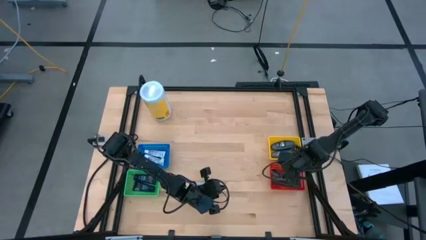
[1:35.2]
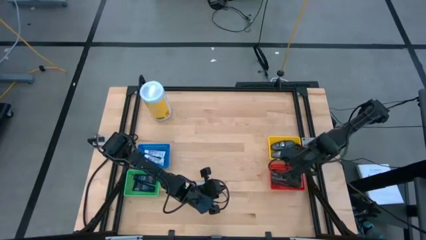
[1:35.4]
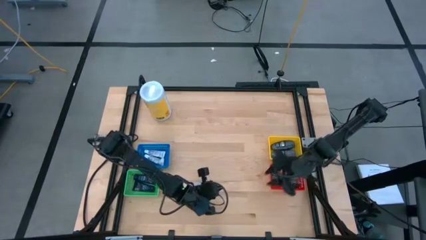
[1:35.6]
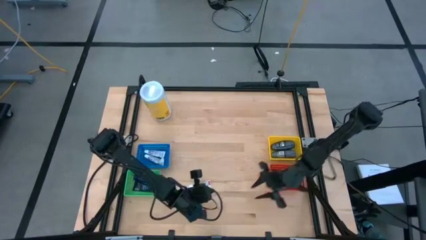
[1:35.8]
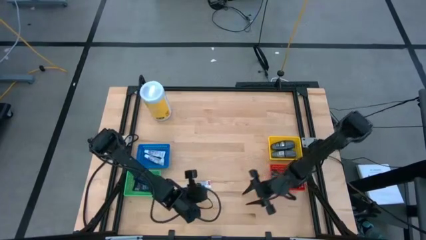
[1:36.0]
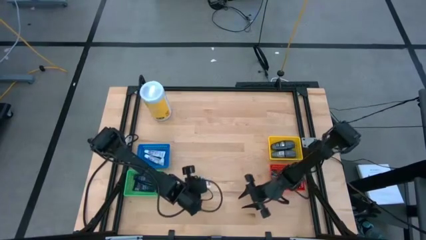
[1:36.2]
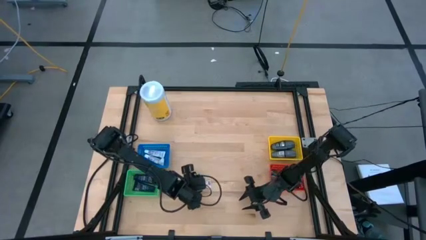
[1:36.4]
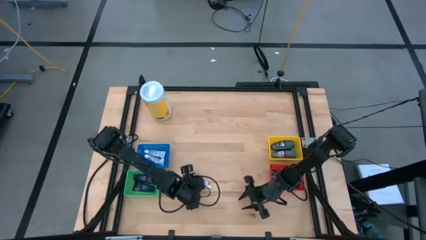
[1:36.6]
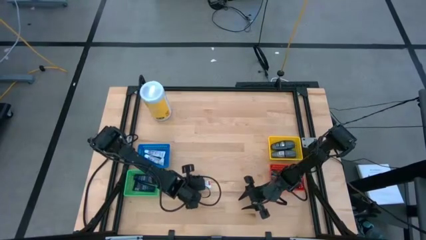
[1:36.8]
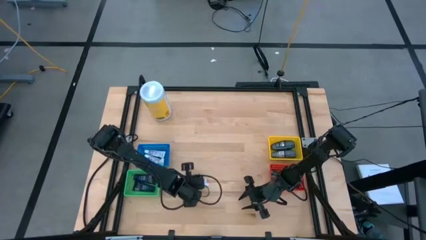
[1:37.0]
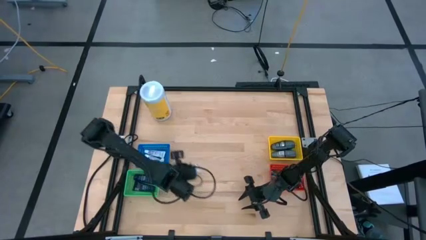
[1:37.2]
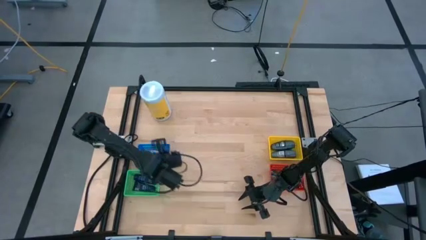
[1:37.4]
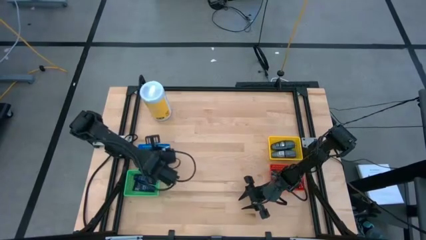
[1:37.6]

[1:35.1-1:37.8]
Task: Pick & Place Travel size toiletries
Put the white toothpaste into the blue basket

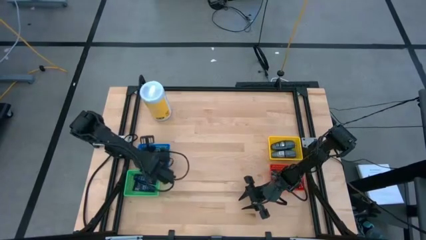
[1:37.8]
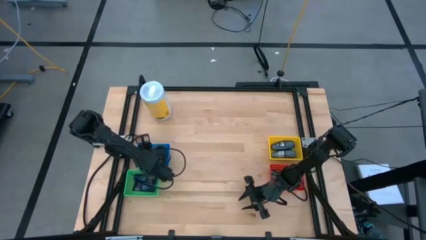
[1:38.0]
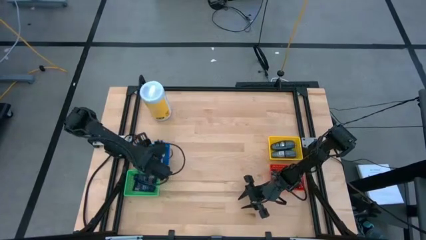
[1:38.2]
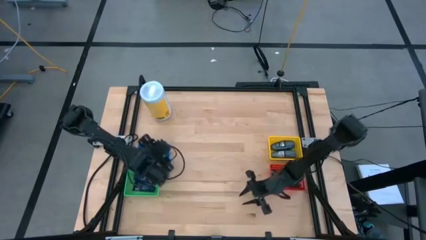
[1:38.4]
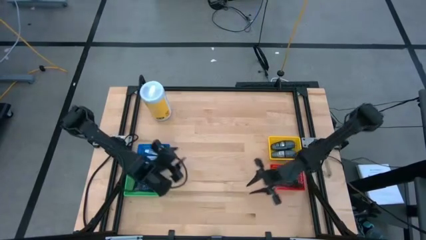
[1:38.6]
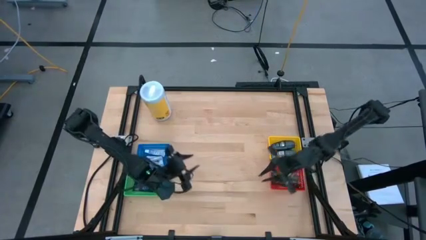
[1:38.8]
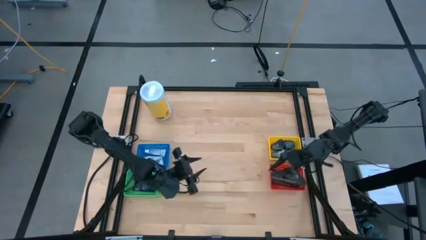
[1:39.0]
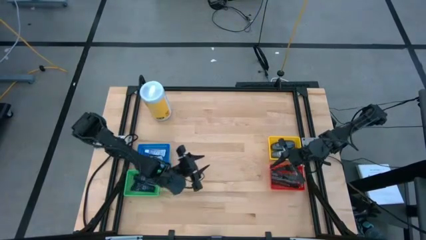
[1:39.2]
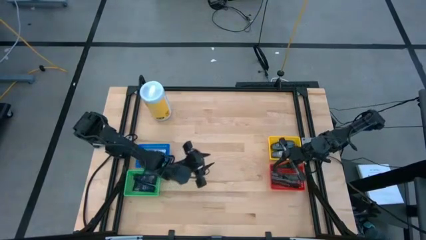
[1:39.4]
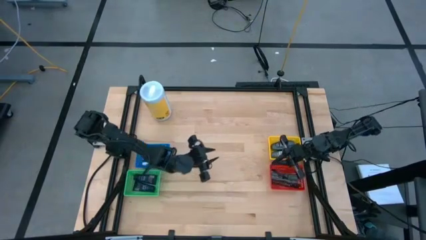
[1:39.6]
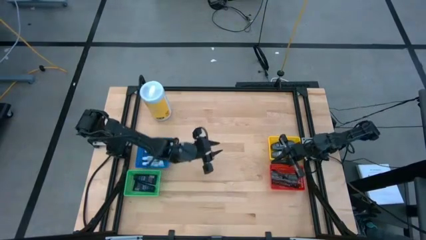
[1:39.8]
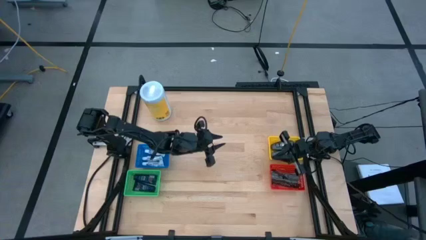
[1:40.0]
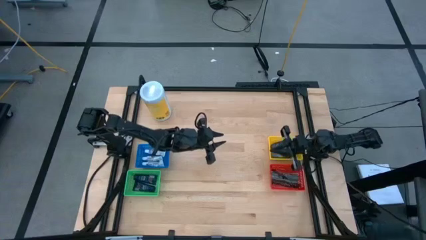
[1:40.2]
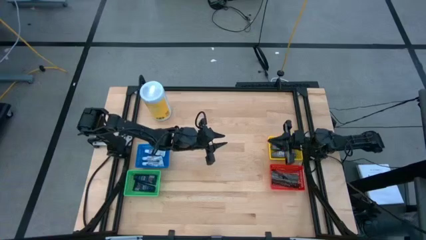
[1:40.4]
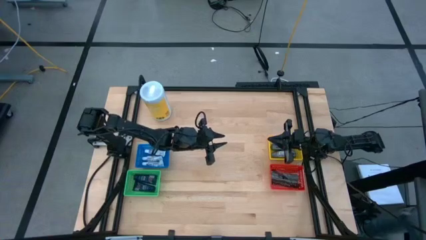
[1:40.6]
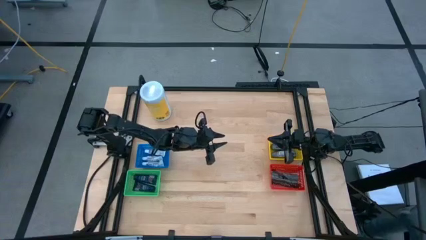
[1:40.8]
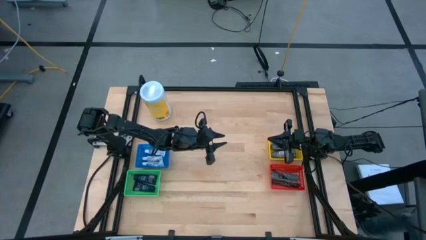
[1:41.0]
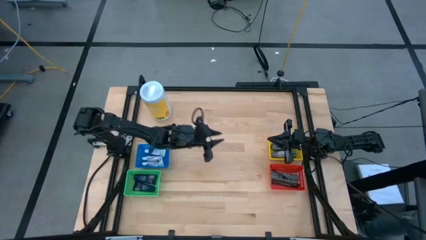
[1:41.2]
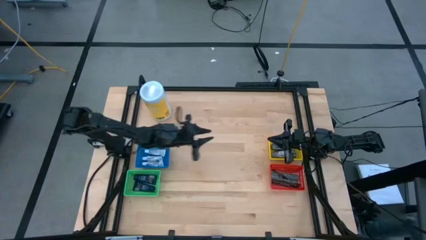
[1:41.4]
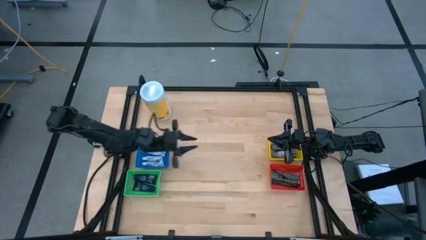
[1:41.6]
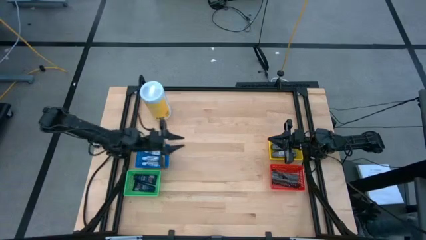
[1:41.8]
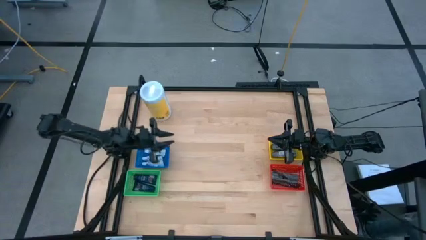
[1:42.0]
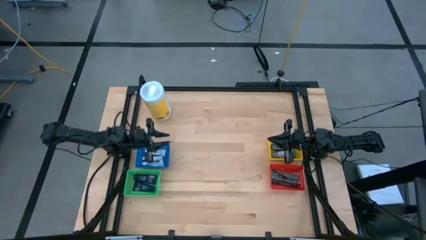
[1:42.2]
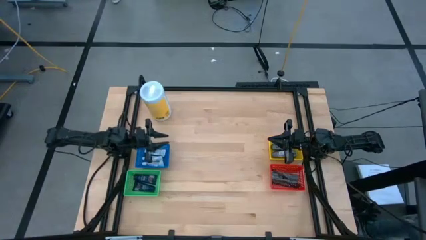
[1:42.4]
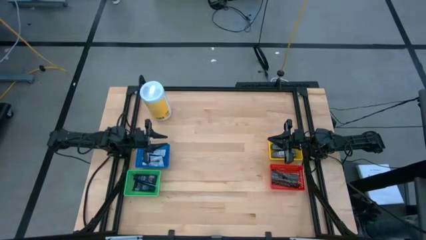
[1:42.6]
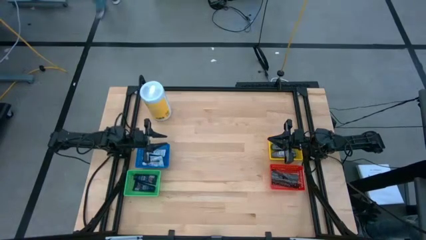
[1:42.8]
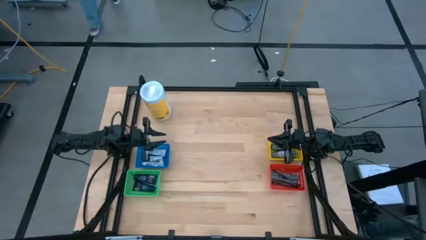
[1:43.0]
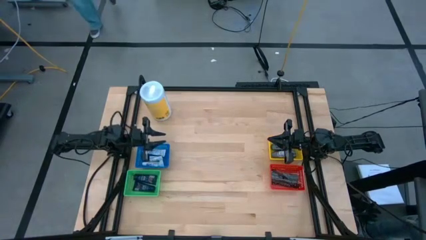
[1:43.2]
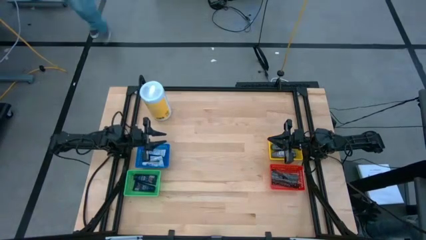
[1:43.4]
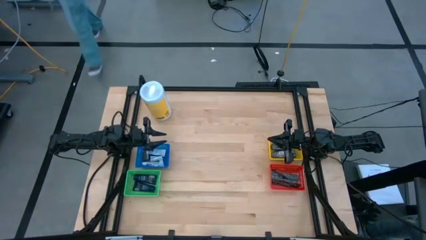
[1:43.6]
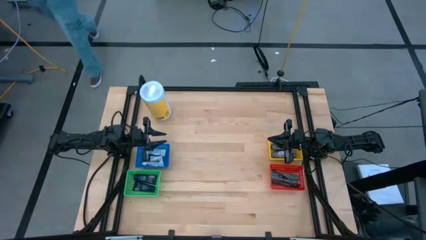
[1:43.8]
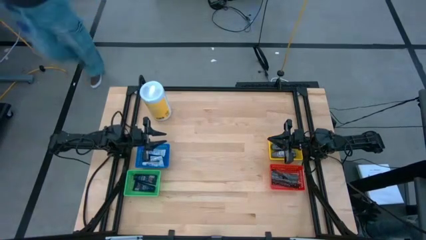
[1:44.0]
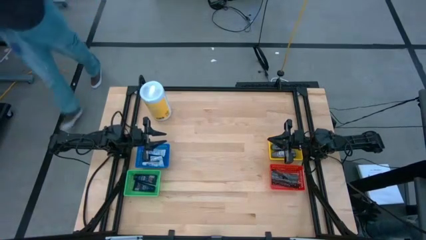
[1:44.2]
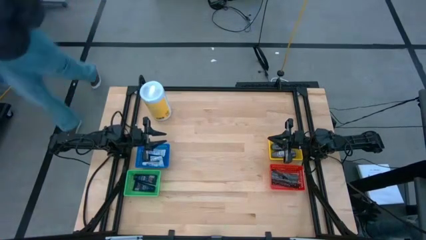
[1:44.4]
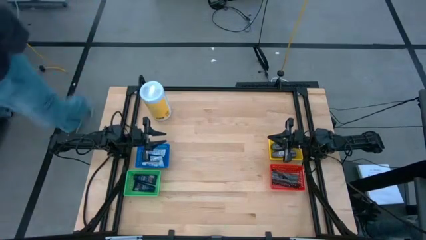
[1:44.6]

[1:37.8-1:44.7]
Return to Home Position

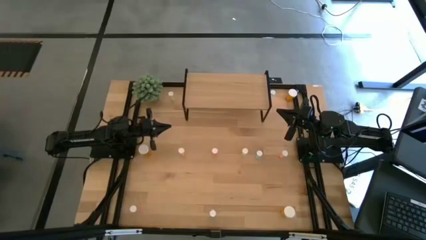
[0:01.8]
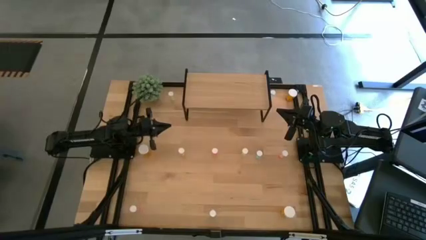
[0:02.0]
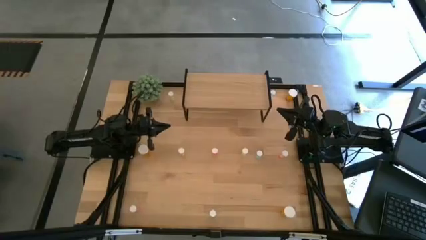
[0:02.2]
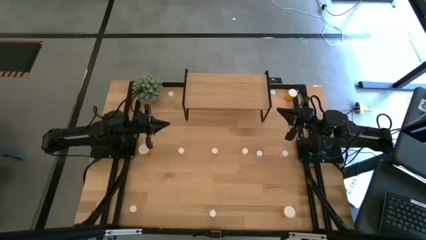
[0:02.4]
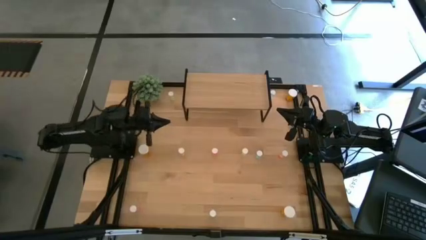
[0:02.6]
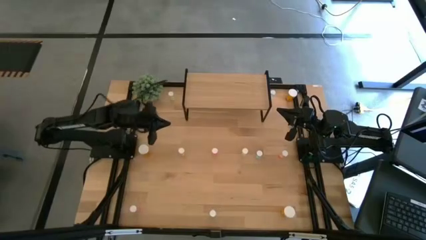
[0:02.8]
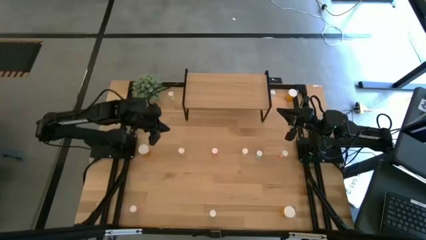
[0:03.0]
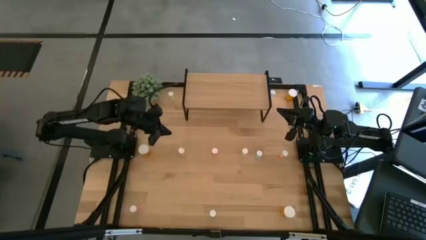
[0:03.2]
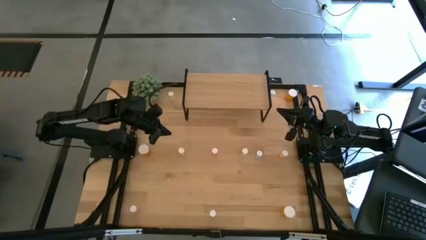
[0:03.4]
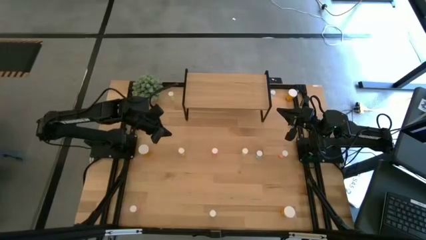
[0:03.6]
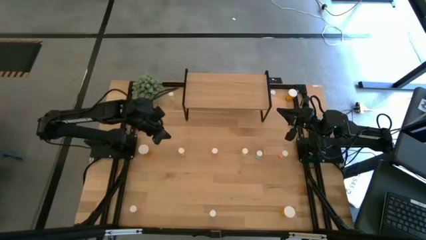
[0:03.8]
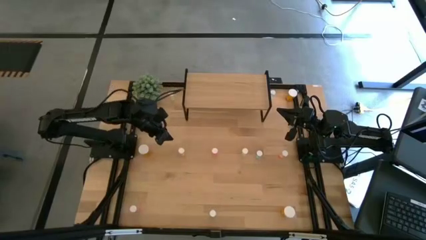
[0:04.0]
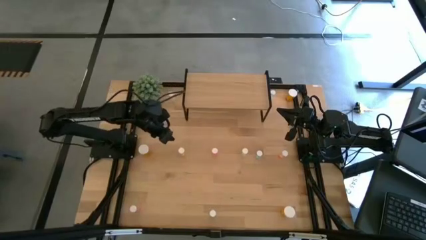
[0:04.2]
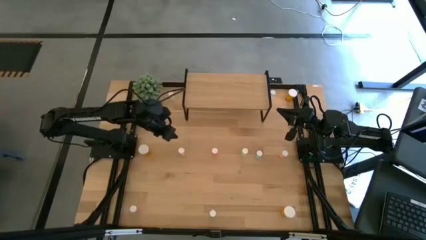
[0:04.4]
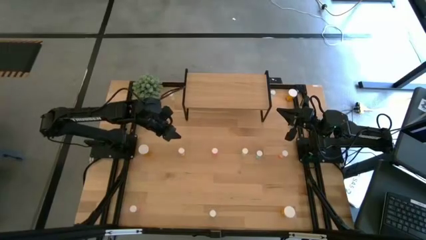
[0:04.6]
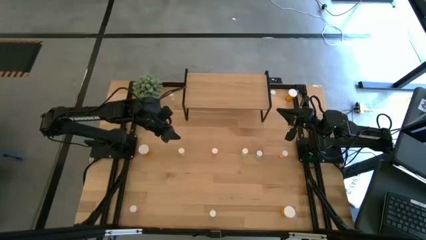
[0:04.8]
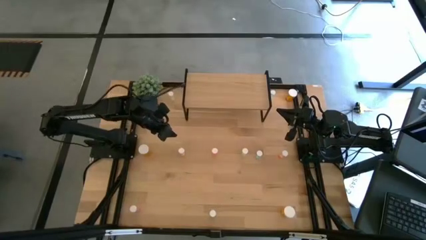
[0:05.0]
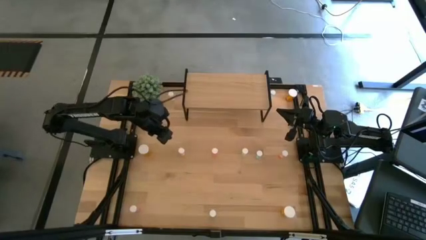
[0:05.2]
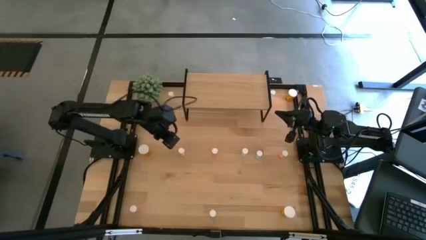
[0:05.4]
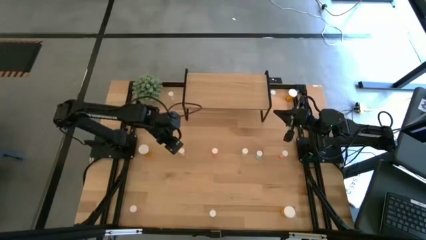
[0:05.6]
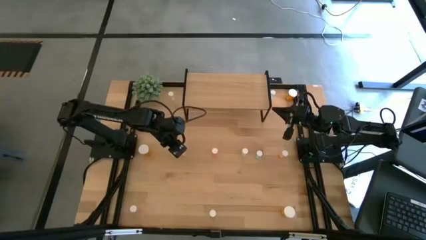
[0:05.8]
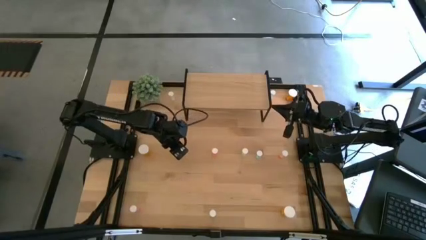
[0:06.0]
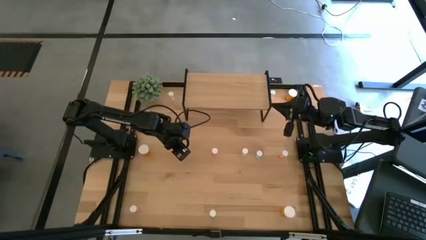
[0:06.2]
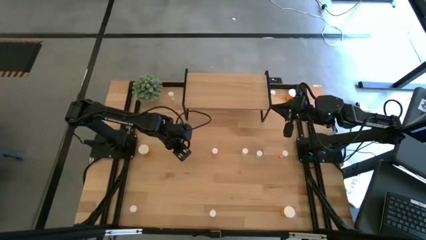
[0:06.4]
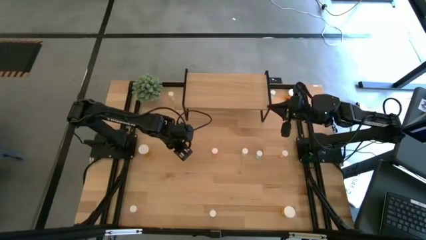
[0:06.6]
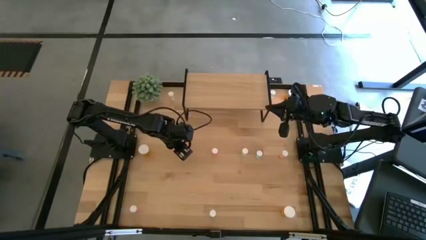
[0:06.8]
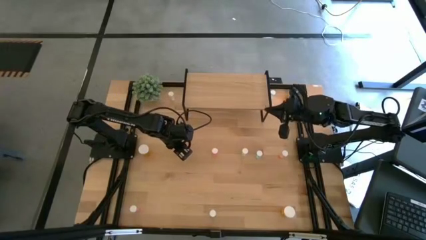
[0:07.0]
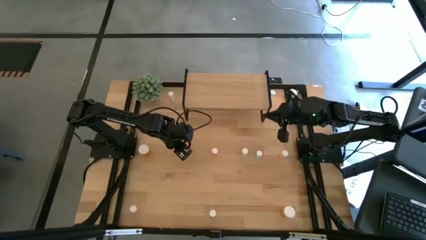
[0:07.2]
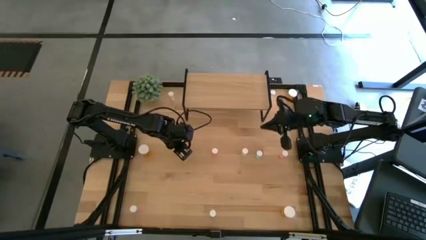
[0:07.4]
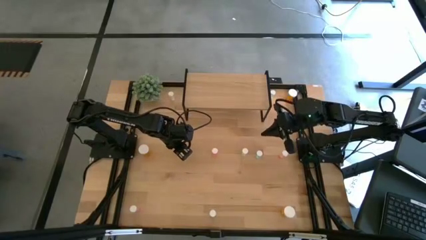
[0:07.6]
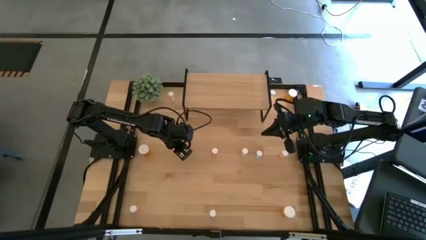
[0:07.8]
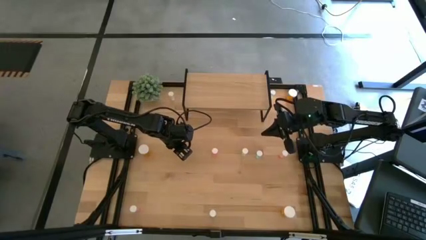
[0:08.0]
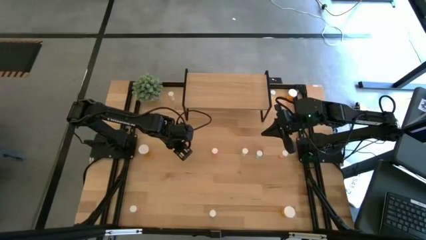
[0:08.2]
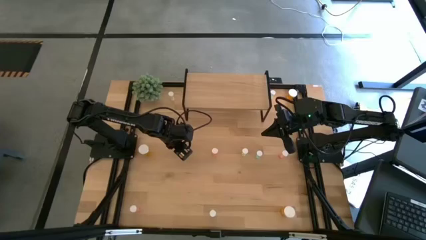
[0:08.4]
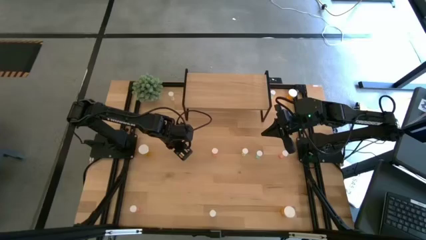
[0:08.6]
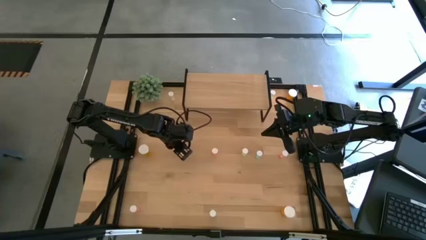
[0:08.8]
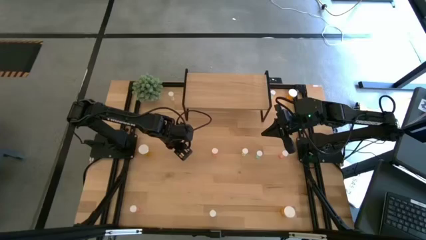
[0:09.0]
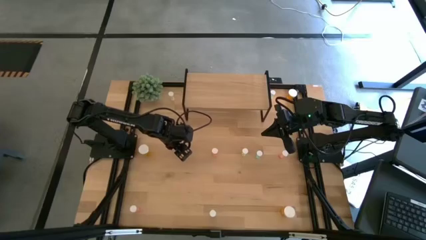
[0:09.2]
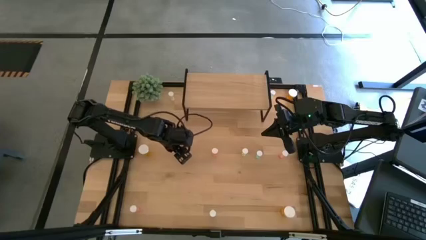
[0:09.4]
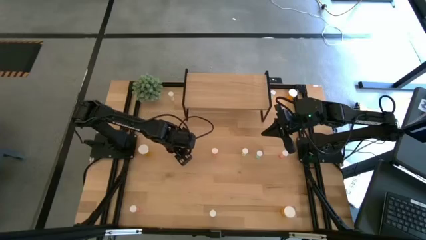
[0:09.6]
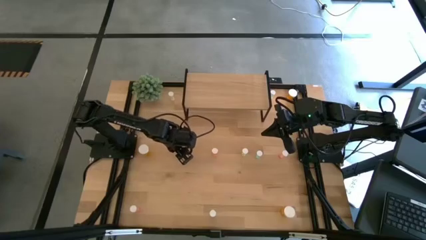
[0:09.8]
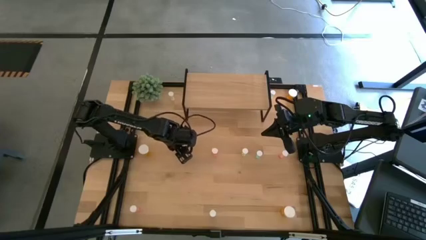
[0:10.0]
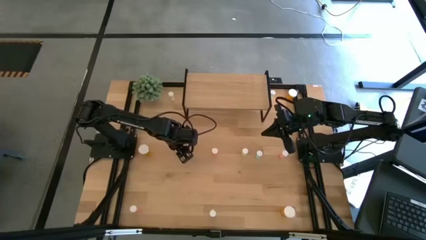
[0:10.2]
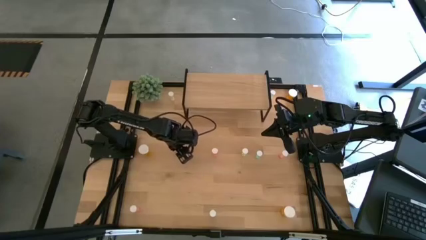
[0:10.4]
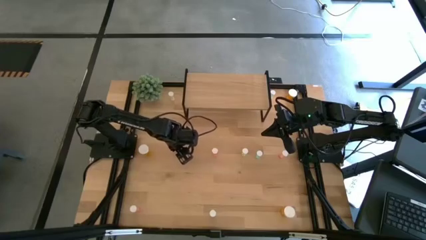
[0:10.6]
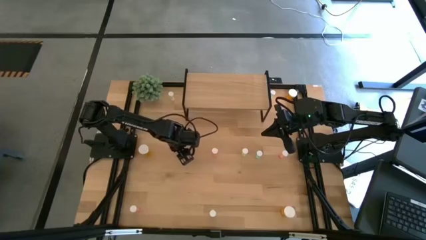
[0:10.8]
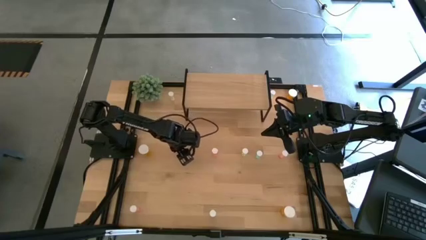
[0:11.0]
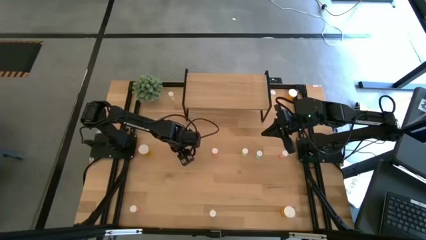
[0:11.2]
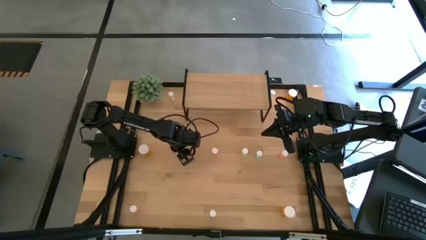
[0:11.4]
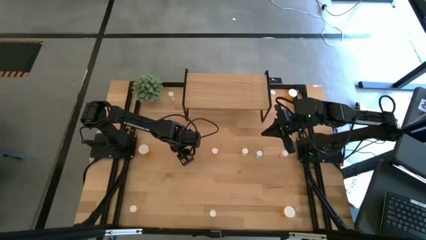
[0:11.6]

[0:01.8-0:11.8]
Task: Pick and place medicine bottles onto shelf by color
Put the bottom left yellow pill bottle on the shelf
